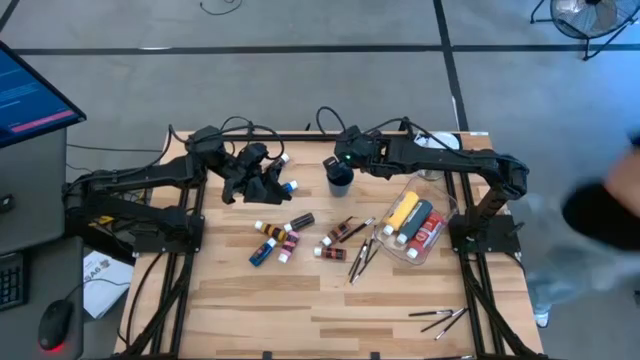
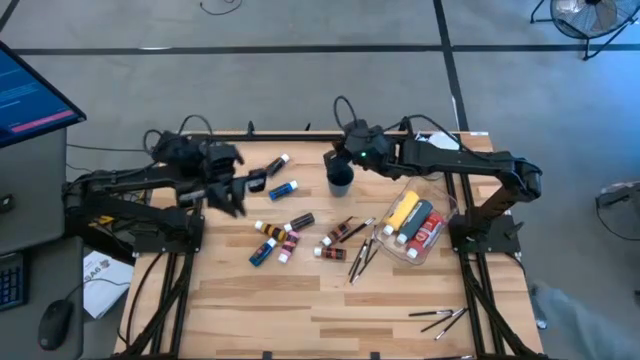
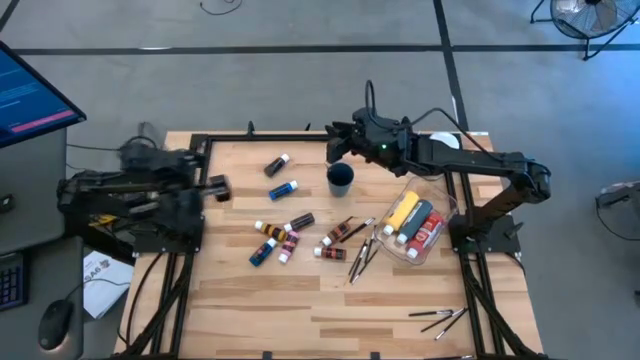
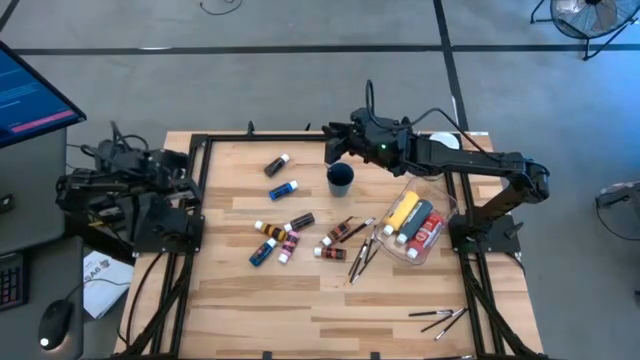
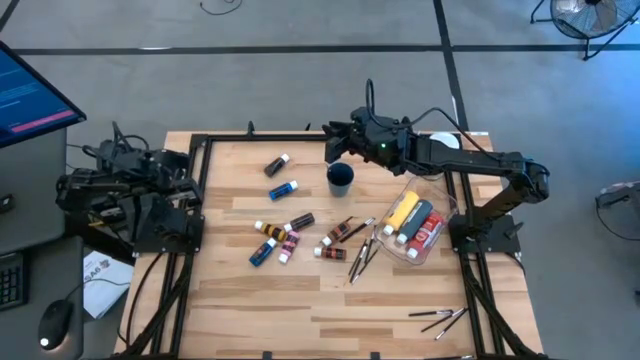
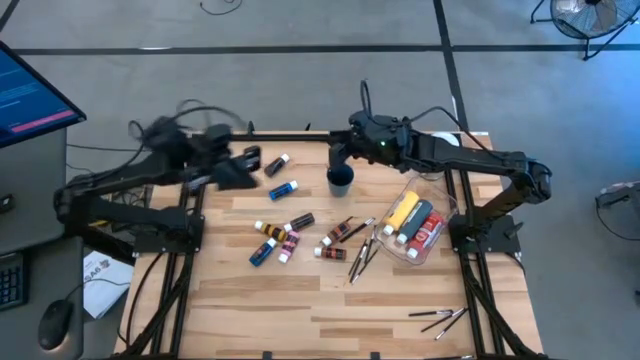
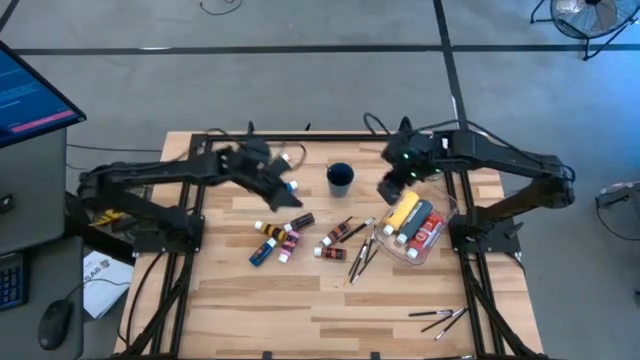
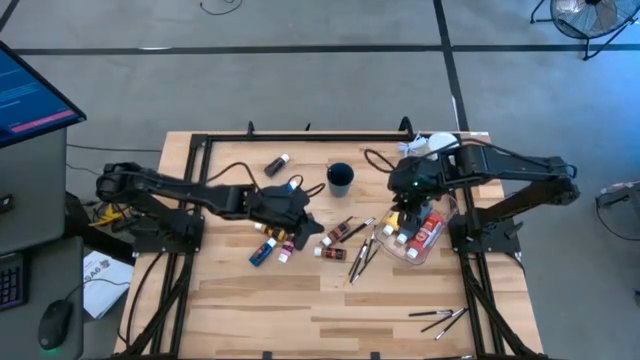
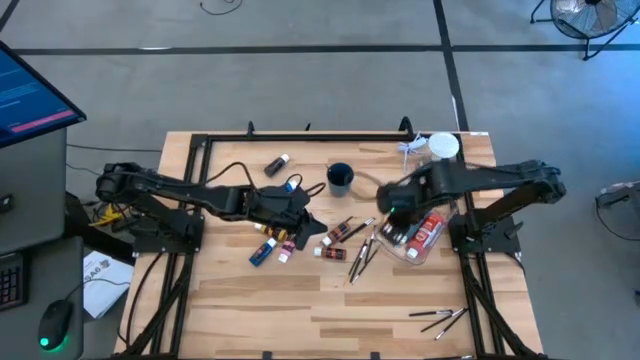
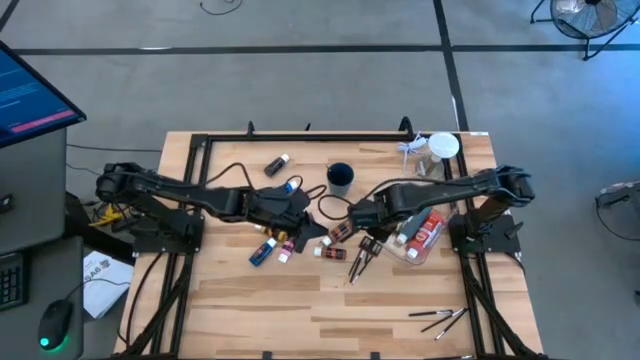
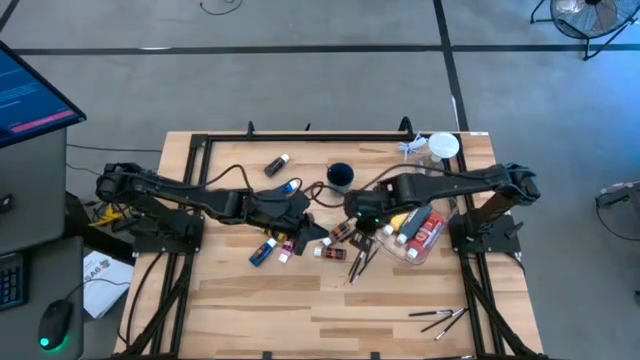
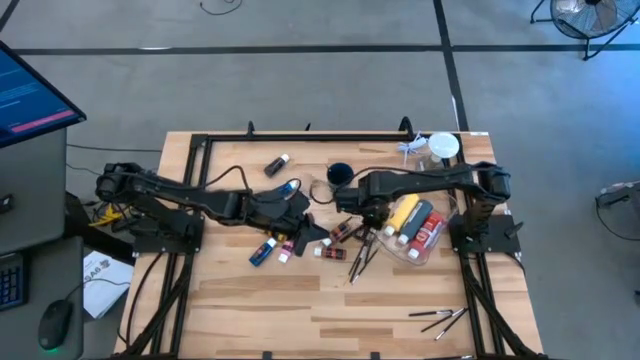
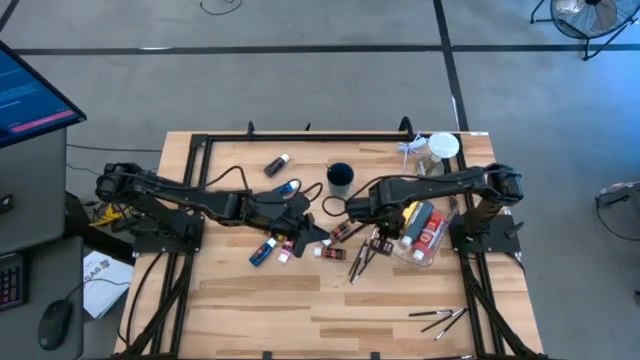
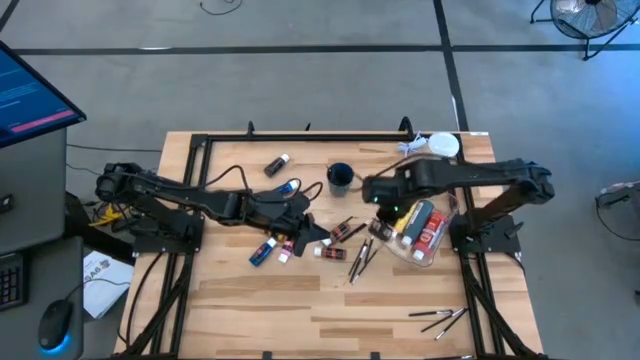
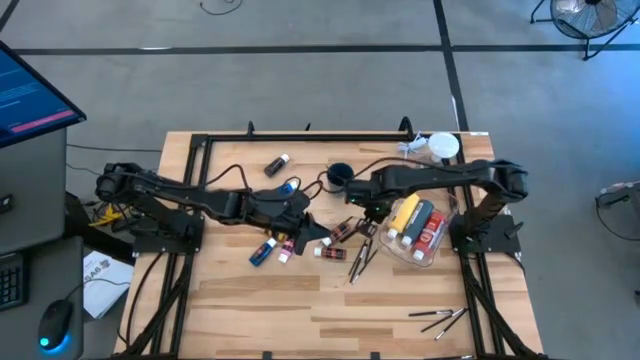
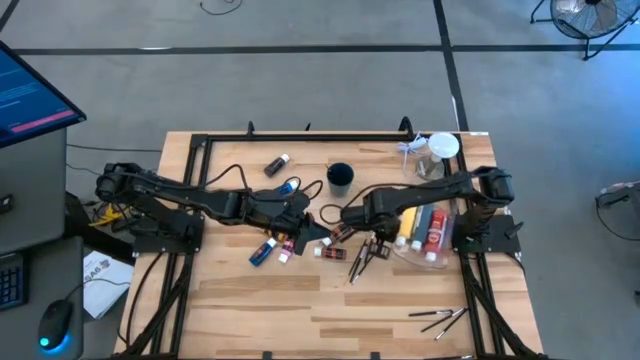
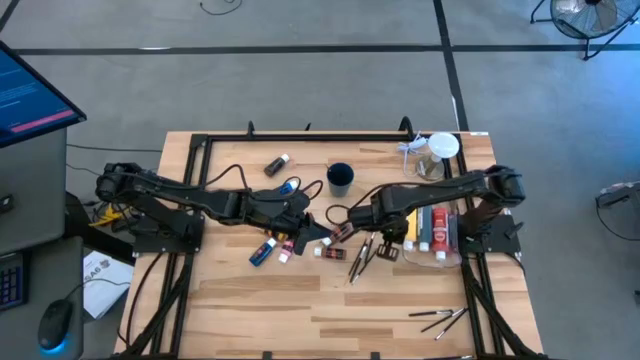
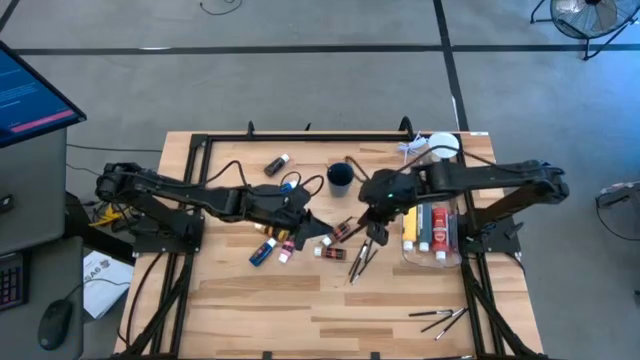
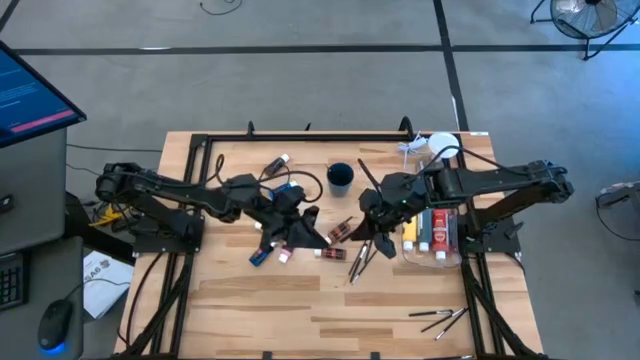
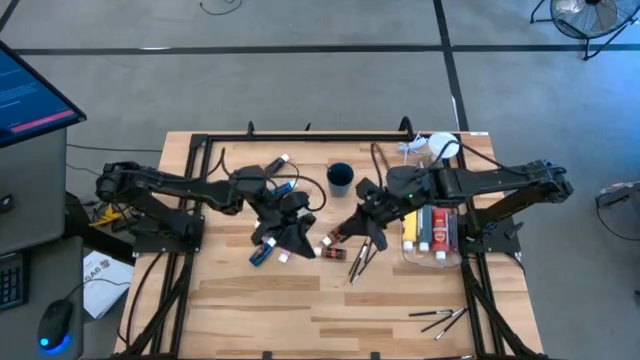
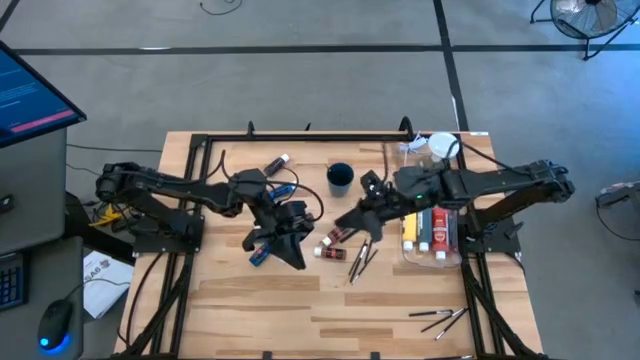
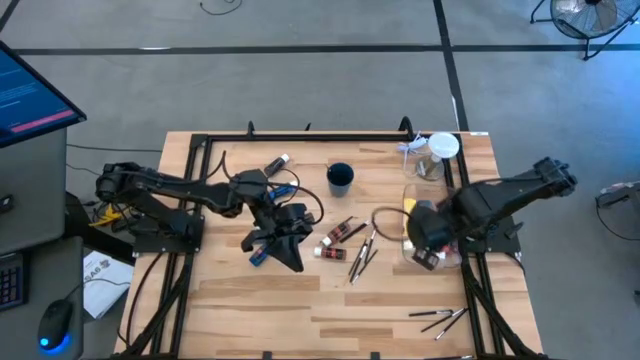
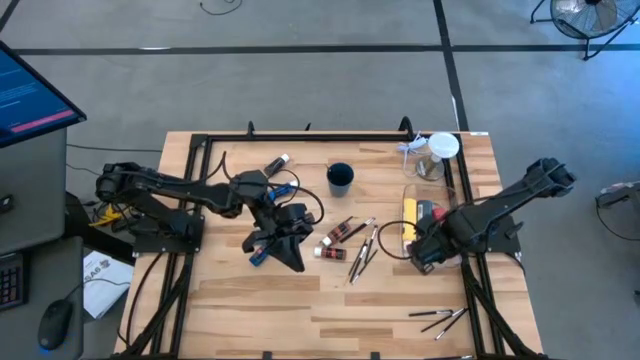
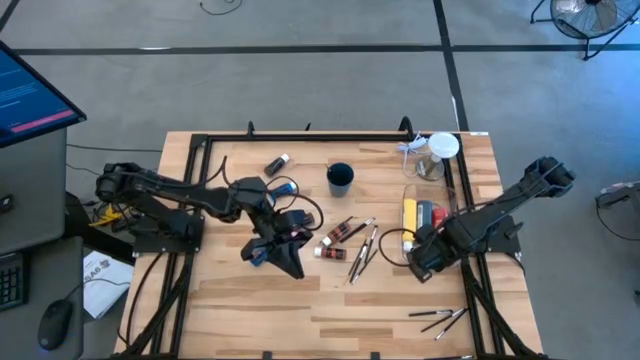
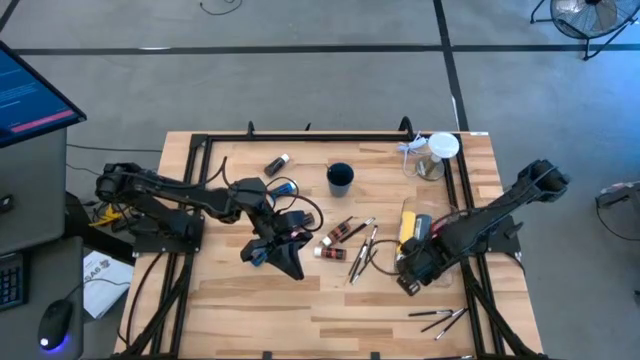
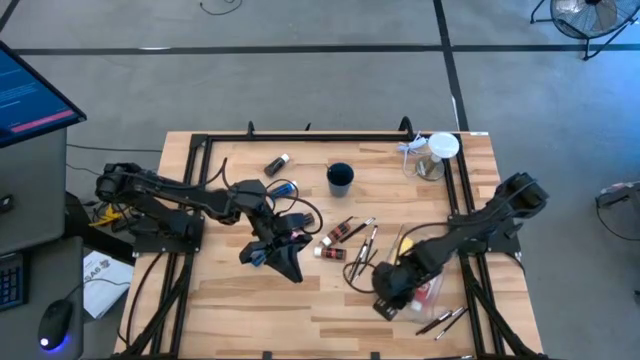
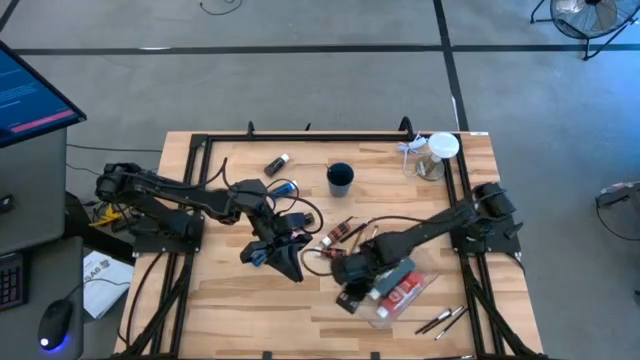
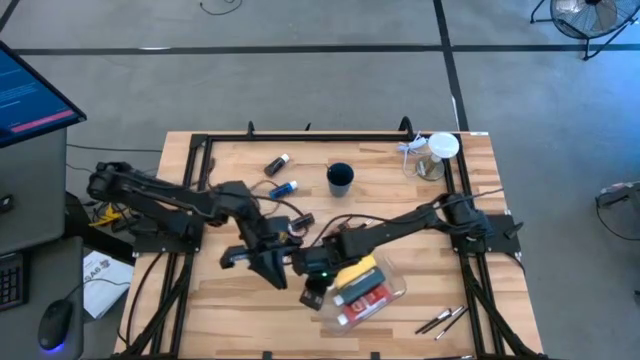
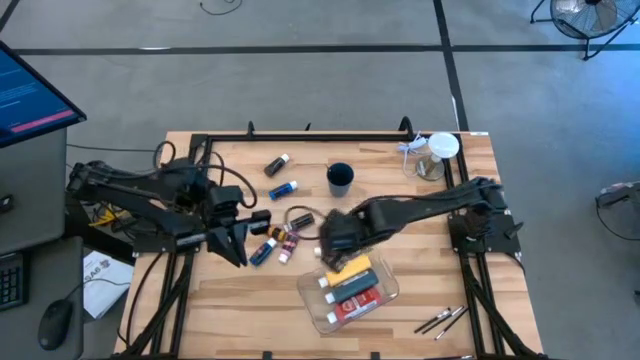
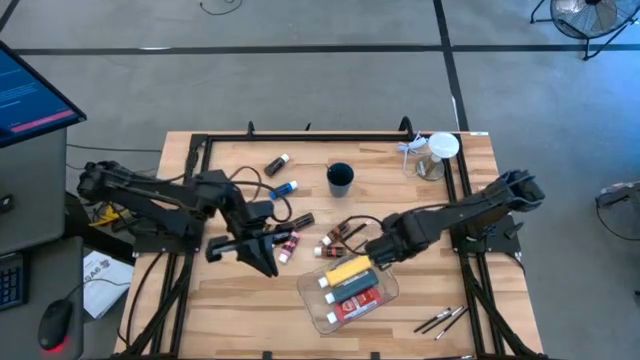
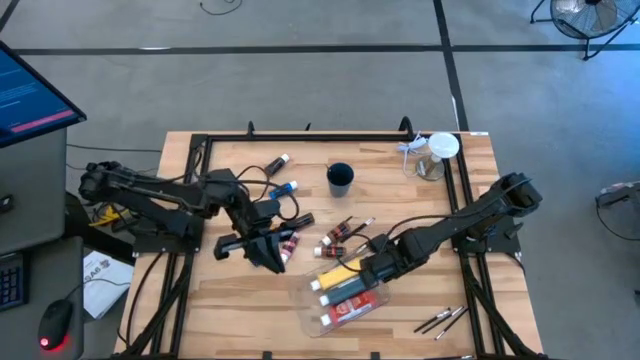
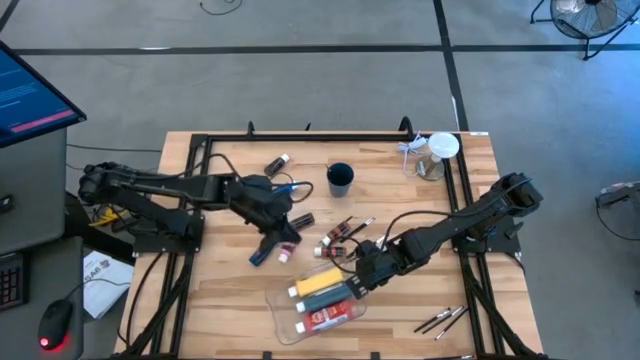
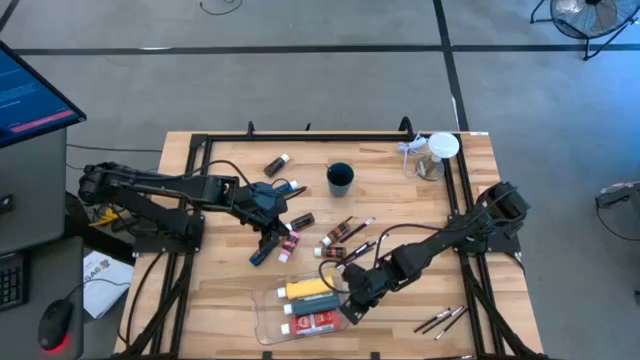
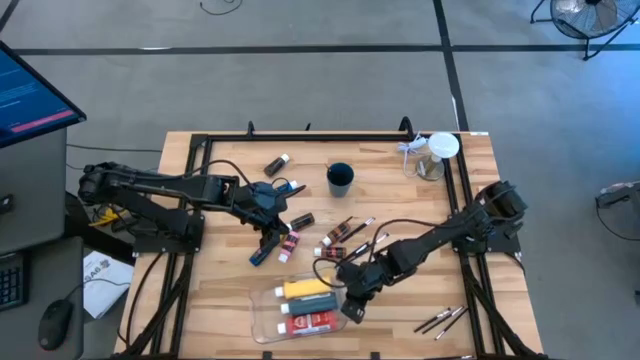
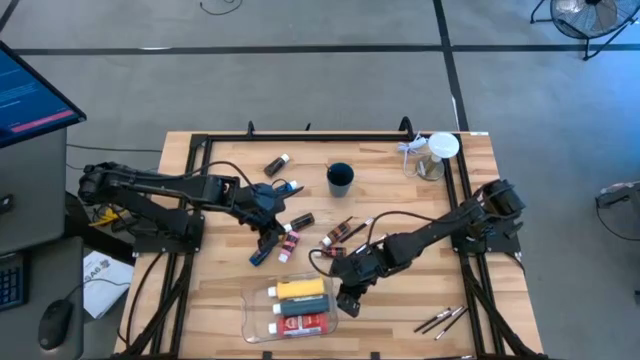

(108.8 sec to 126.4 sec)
Task: Pick & Place Paint Supplies
Move the transparent bin to the bottom center of the table

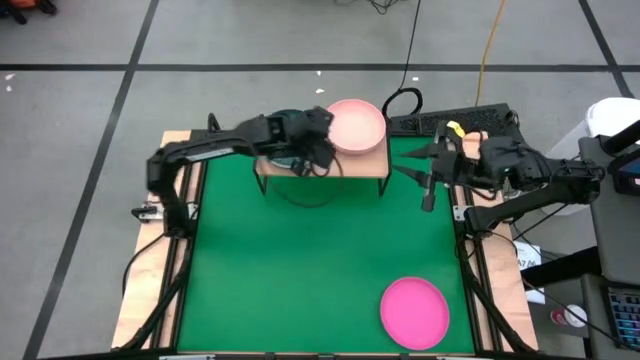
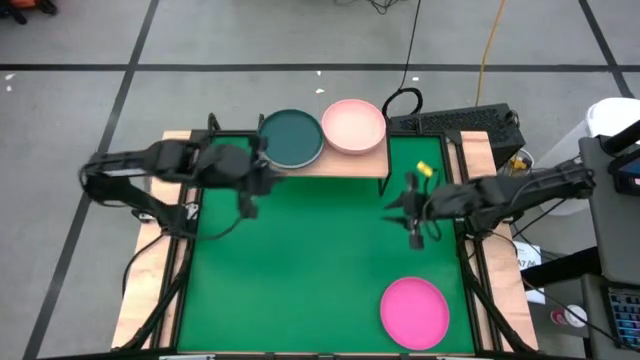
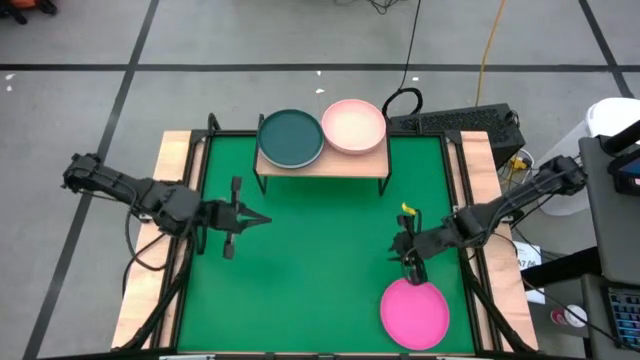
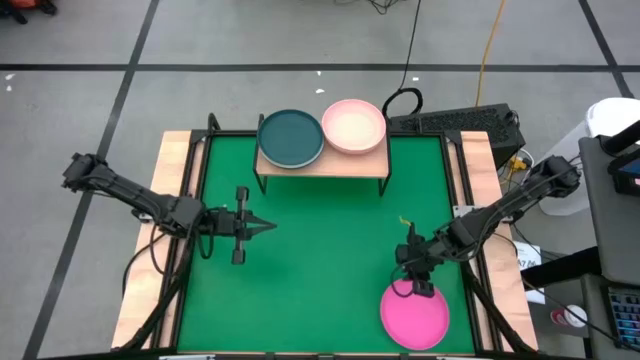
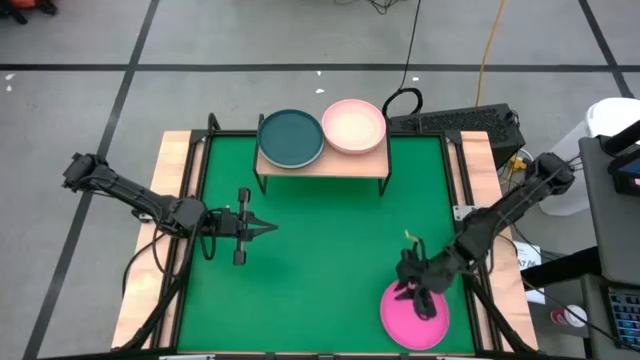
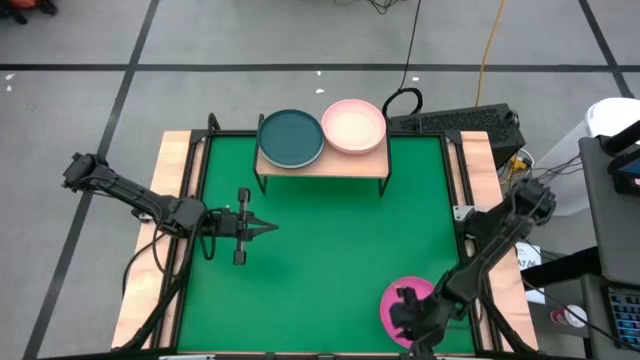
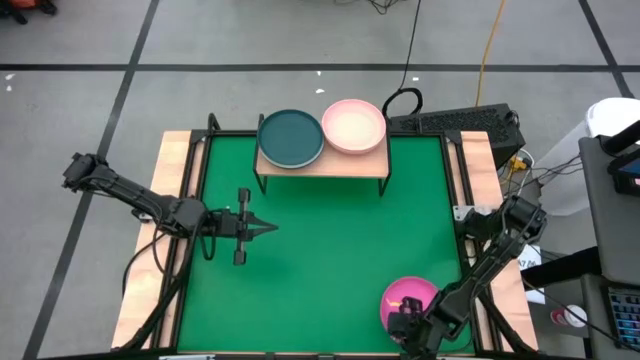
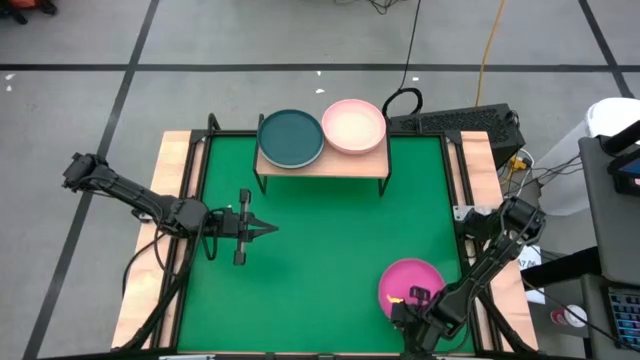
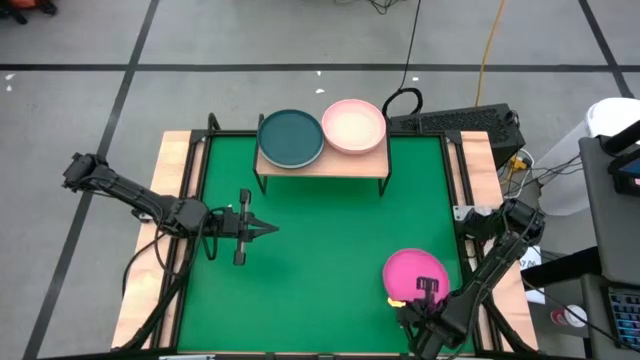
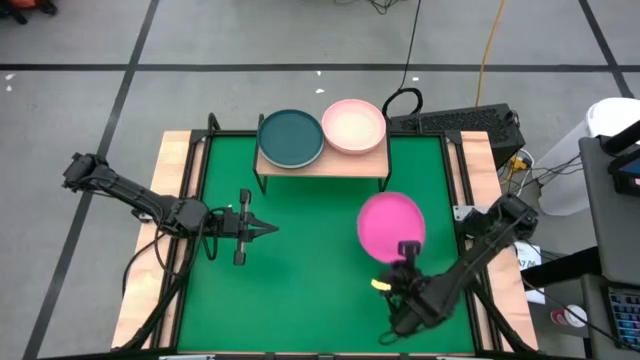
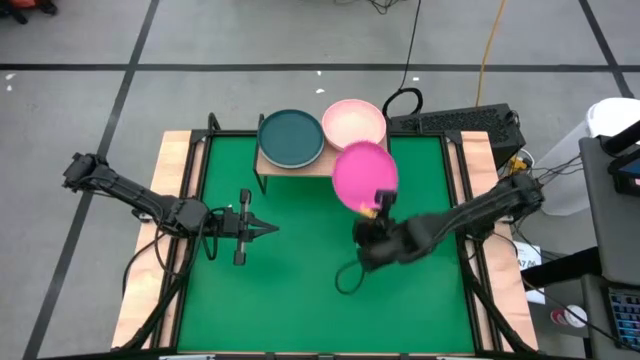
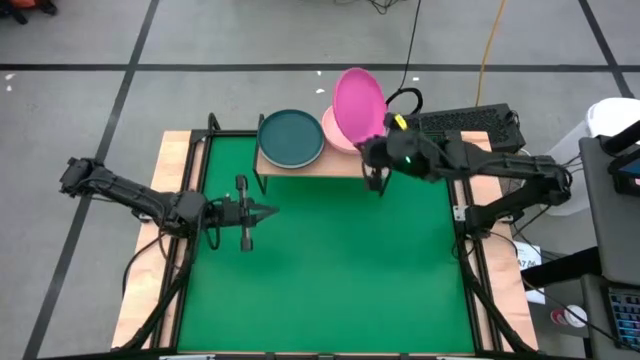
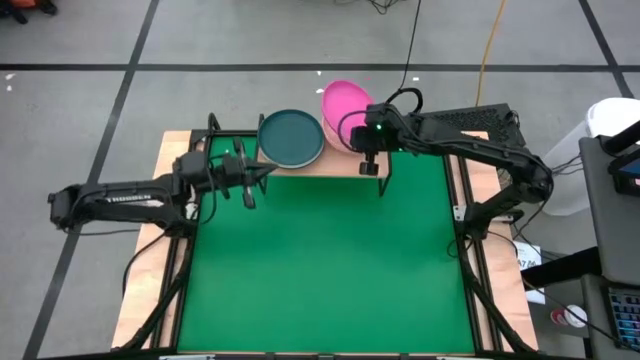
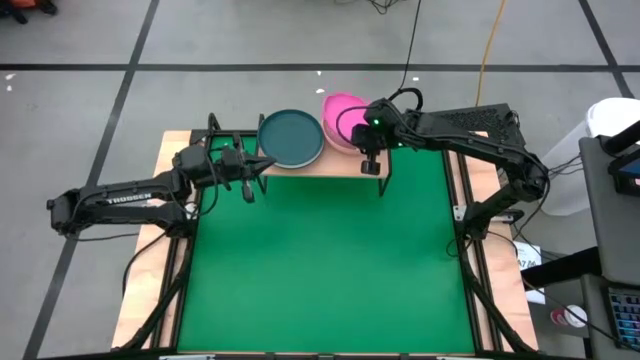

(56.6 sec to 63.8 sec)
Task: Place and stack plates onto a shelf
Stack the pink plate on top of the light yellow plate on the shelf
